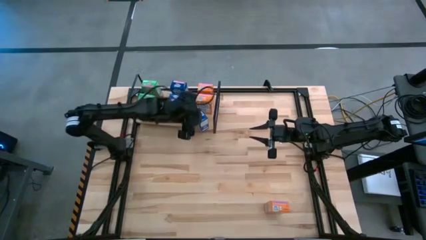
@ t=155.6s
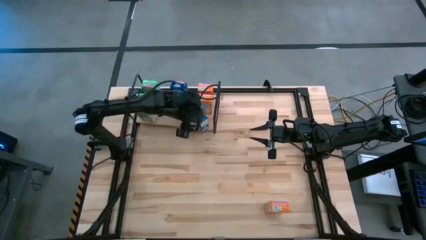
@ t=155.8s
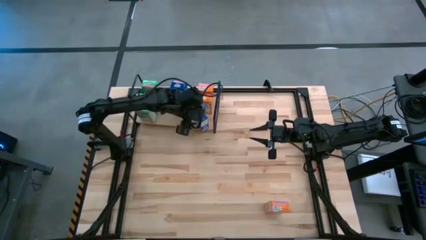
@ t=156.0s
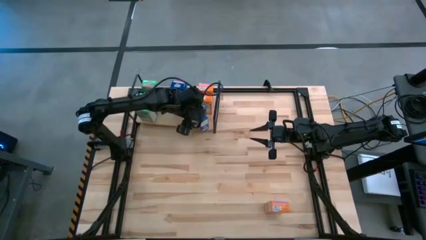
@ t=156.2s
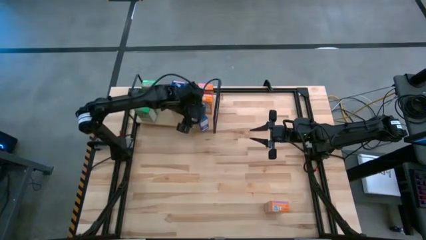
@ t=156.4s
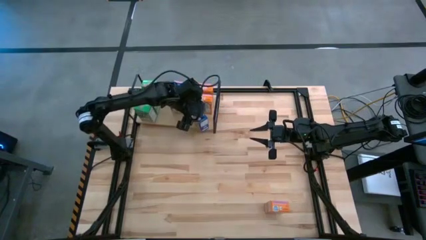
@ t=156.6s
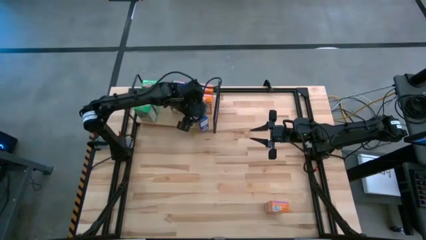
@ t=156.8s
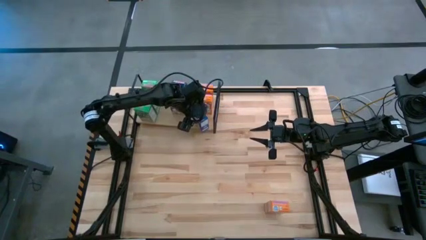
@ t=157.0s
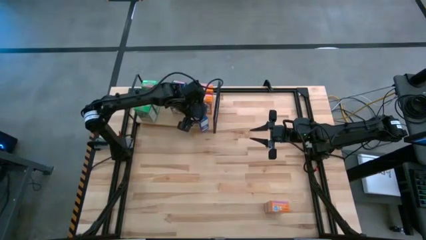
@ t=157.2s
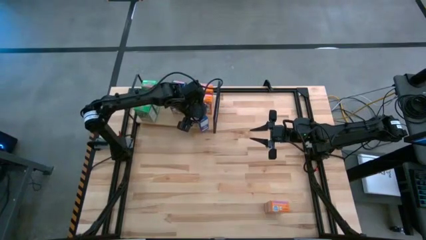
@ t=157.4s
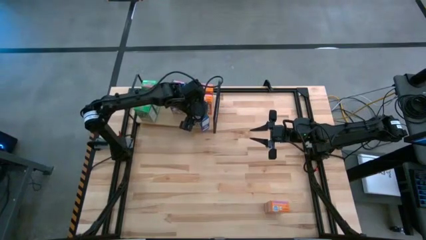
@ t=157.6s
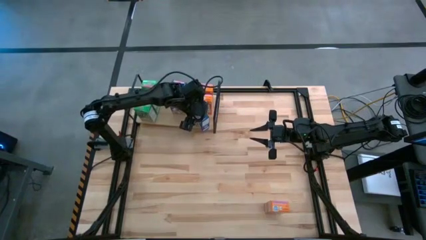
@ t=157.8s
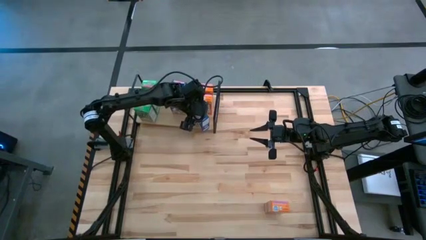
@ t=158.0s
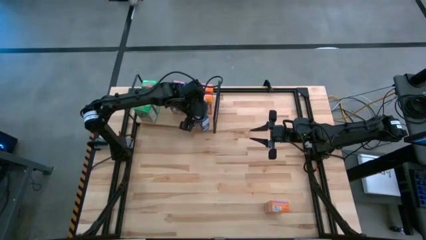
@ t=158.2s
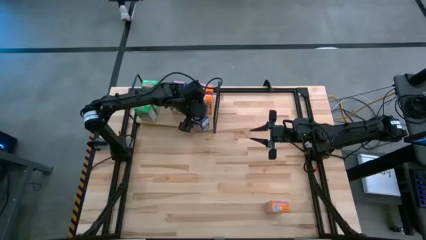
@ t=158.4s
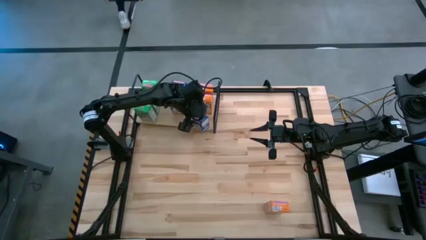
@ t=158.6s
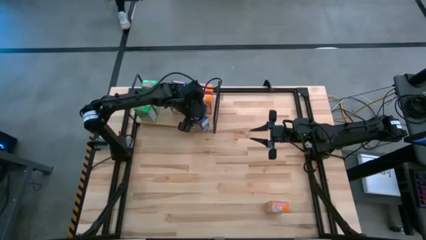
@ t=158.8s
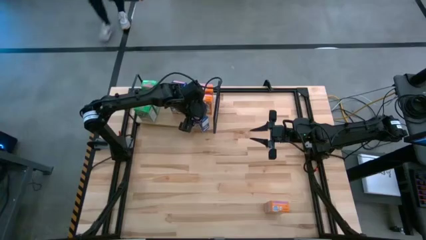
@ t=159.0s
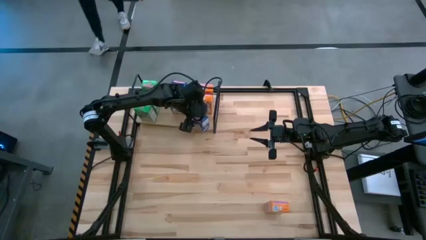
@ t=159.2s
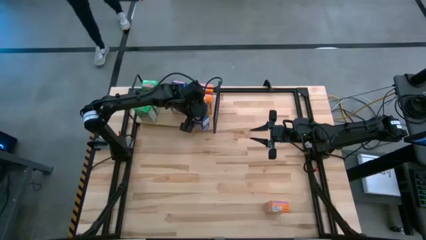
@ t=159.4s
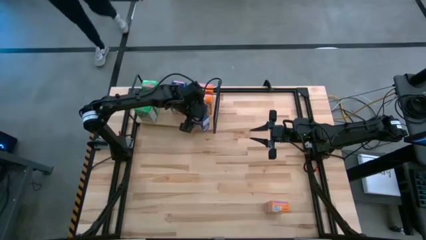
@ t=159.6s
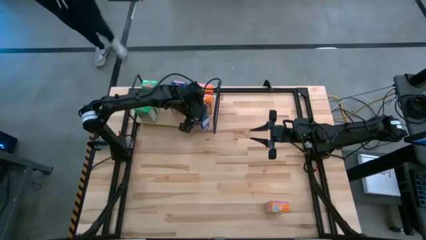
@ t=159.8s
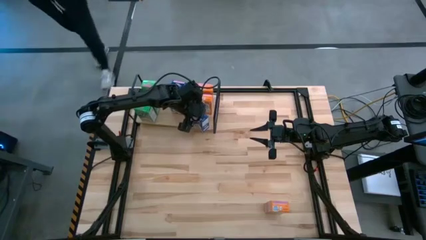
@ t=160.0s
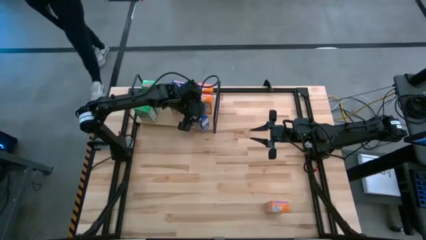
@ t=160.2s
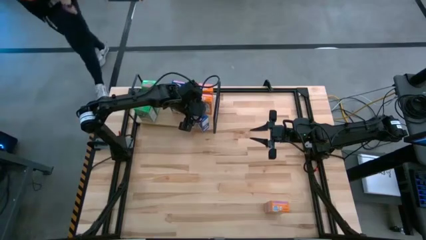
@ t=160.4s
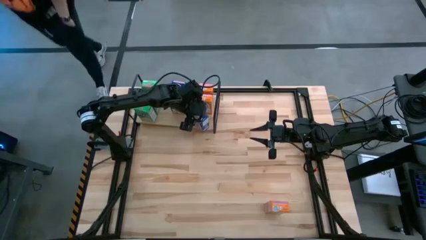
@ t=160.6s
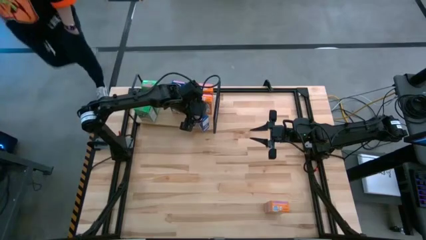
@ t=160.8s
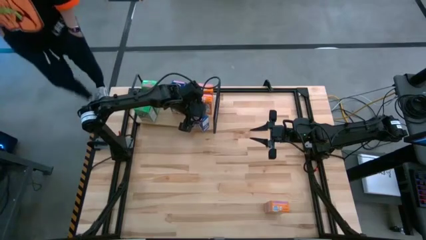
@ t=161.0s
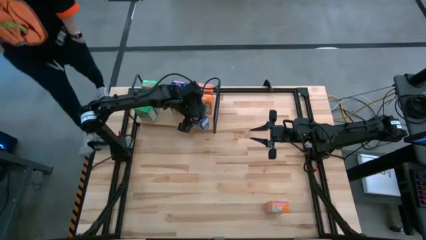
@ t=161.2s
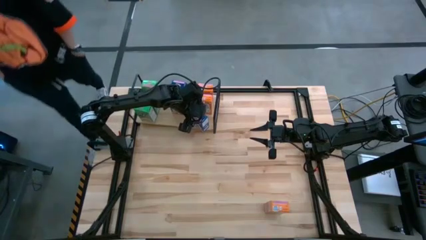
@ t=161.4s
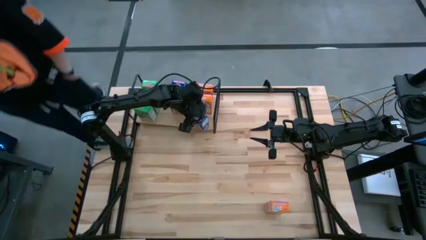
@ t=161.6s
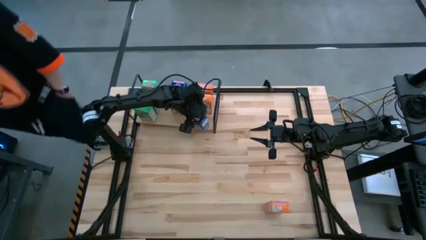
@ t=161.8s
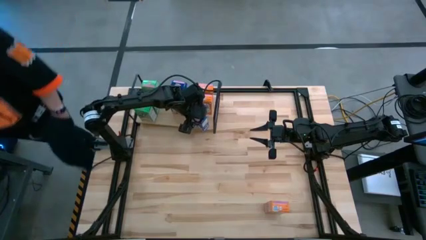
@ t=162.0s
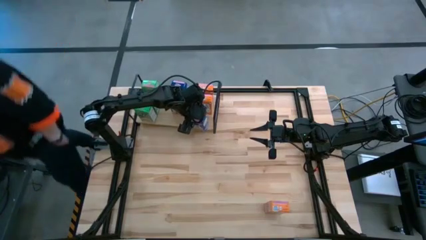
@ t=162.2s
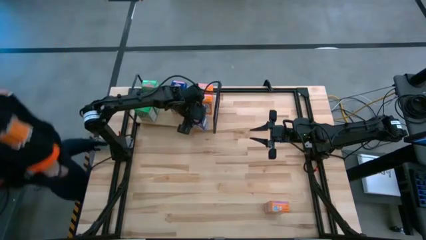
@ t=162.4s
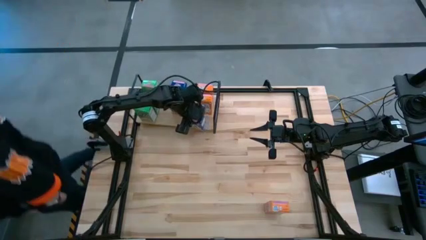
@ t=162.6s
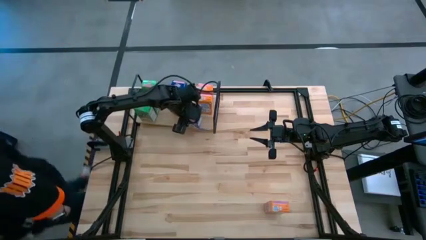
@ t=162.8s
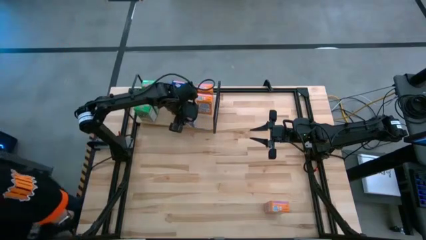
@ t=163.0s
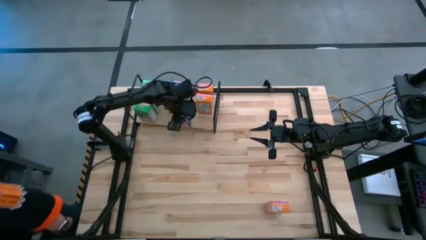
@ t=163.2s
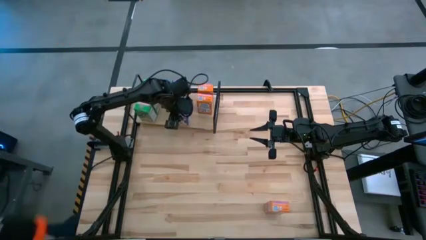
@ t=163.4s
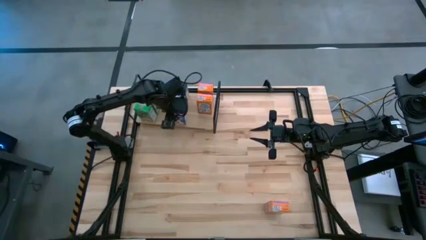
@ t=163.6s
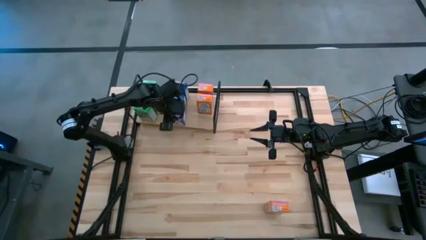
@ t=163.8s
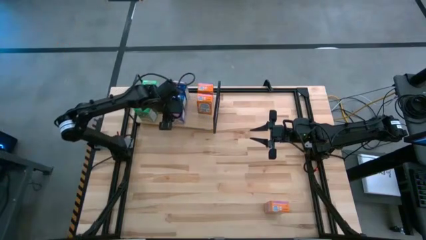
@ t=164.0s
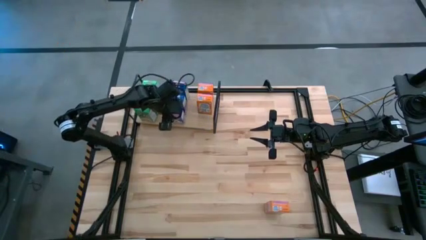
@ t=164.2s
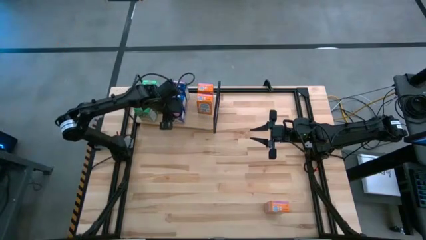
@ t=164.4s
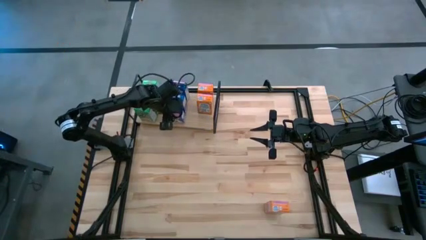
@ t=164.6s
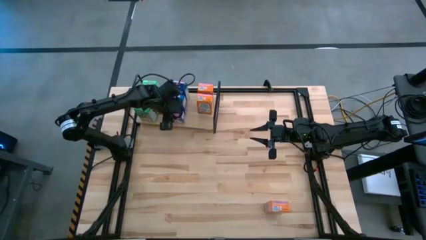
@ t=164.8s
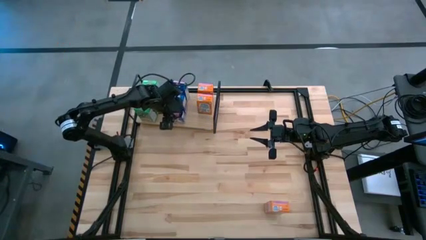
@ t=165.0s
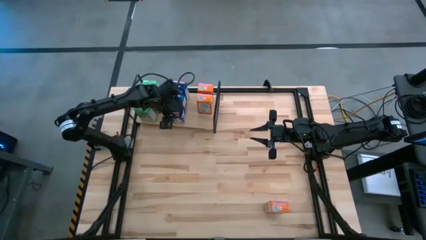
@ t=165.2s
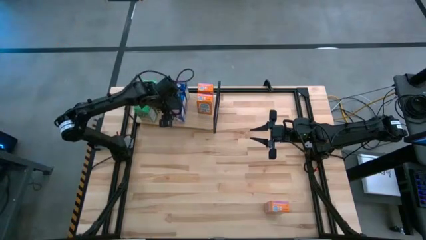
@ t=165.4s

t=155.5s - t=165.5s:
Task: Stack cereal on shelf
Put the blue cereal box on the shelf aligned with the blue cereal boxes
